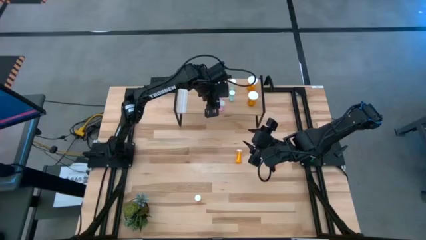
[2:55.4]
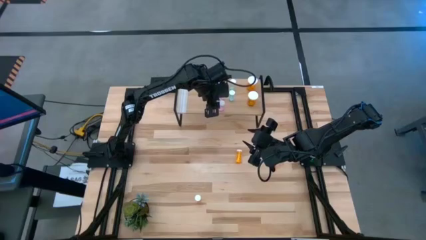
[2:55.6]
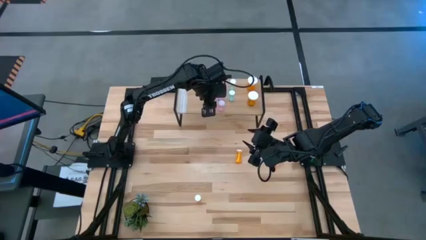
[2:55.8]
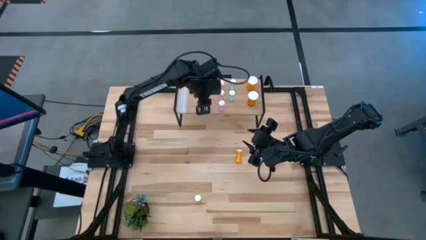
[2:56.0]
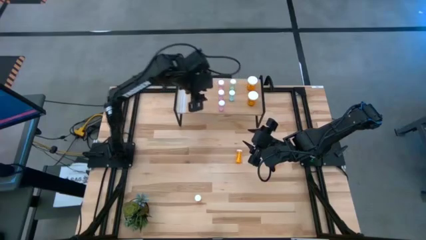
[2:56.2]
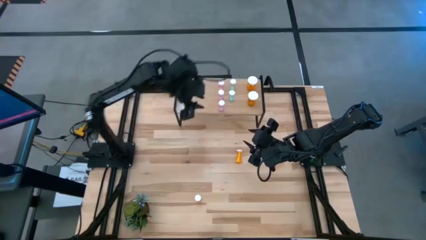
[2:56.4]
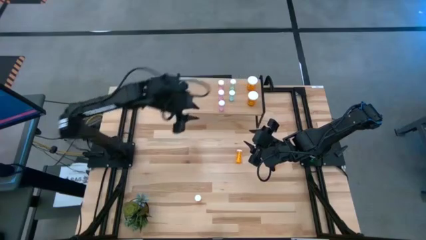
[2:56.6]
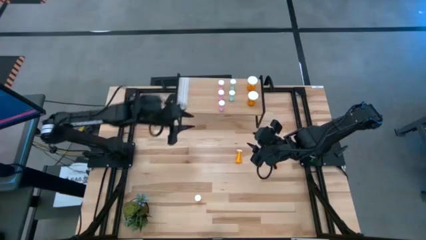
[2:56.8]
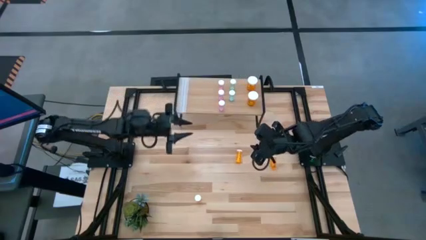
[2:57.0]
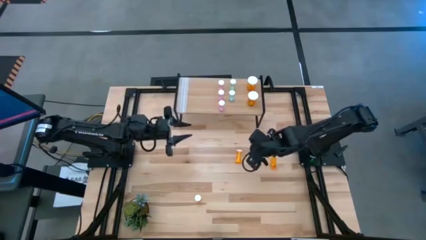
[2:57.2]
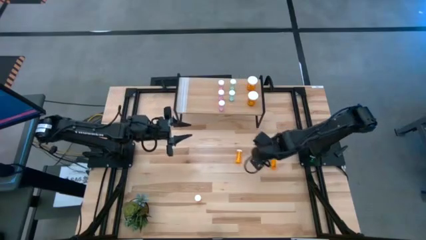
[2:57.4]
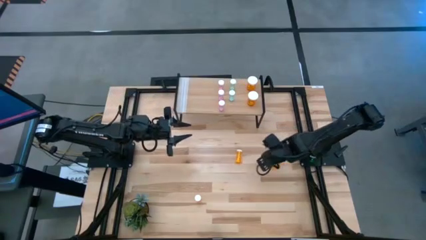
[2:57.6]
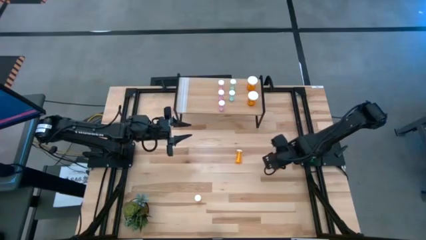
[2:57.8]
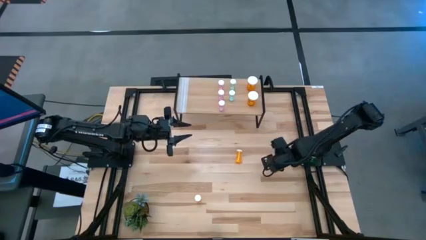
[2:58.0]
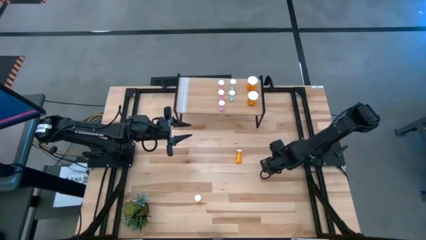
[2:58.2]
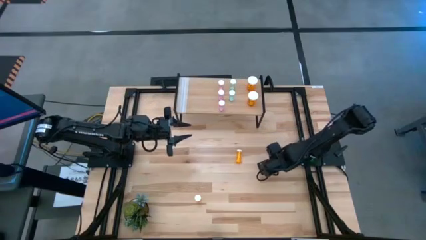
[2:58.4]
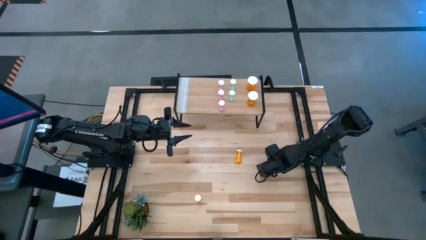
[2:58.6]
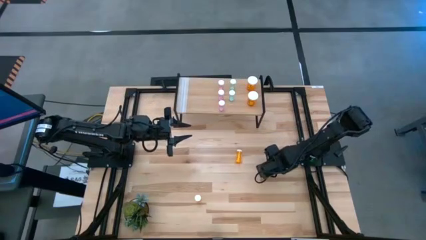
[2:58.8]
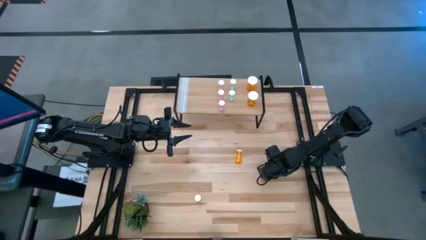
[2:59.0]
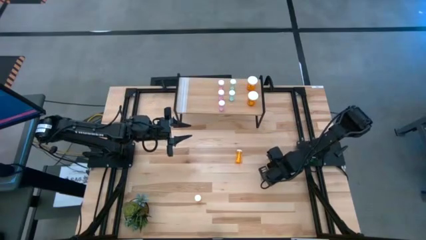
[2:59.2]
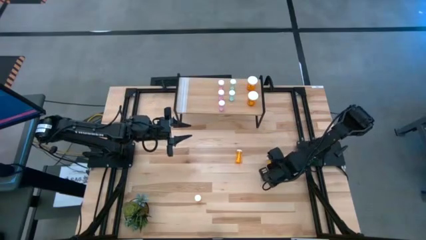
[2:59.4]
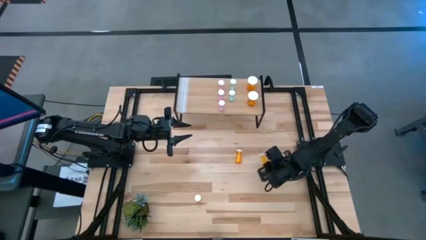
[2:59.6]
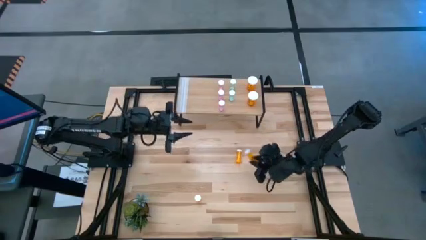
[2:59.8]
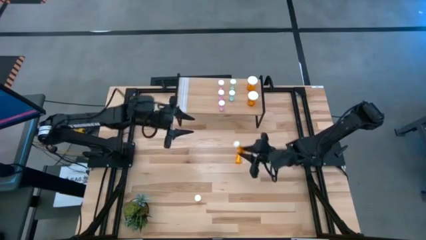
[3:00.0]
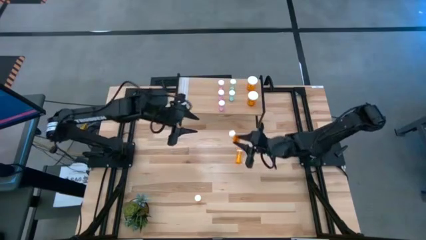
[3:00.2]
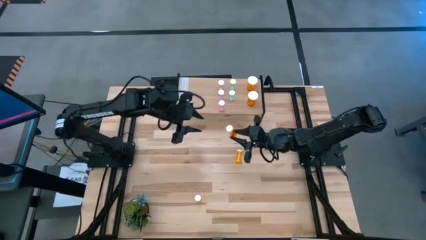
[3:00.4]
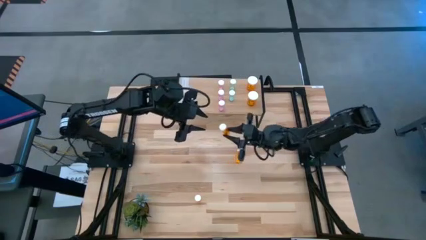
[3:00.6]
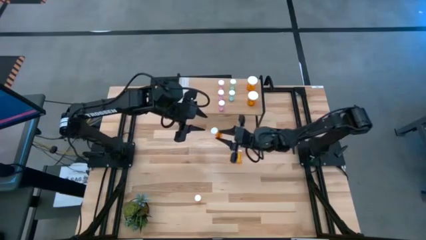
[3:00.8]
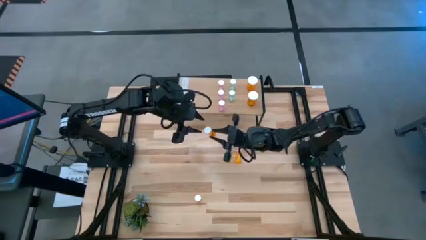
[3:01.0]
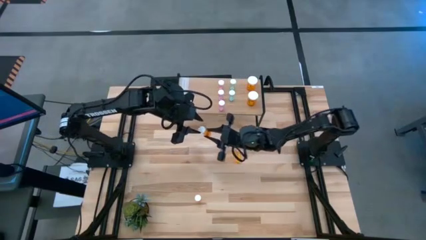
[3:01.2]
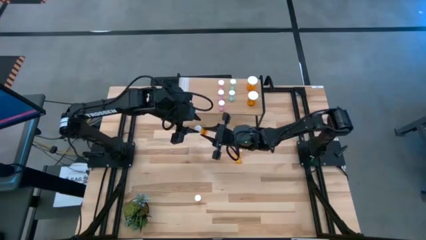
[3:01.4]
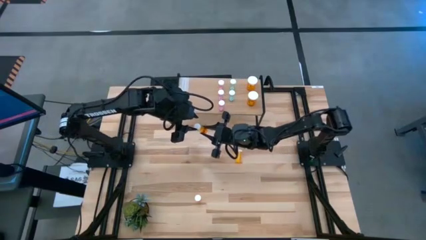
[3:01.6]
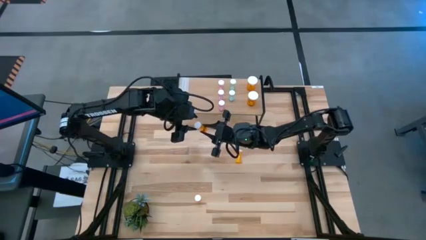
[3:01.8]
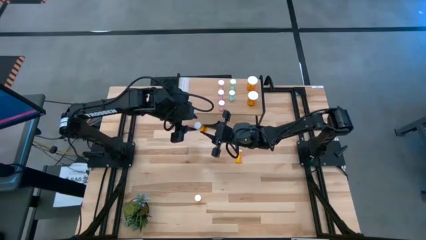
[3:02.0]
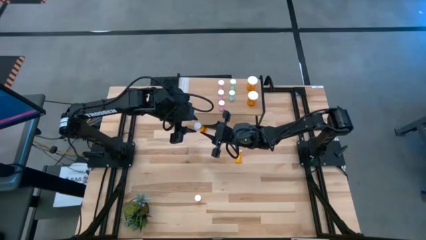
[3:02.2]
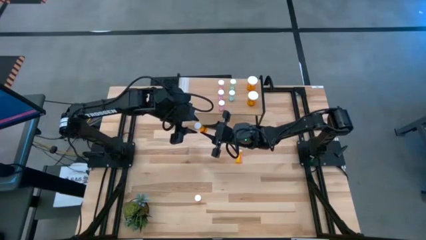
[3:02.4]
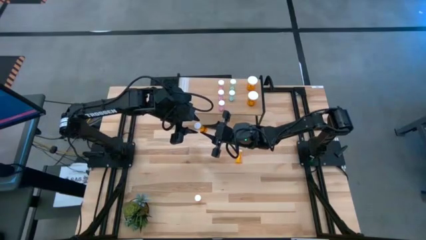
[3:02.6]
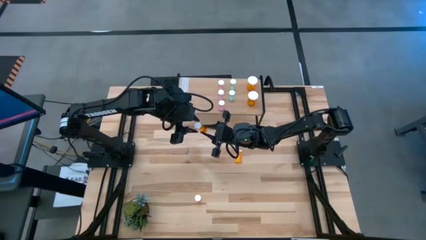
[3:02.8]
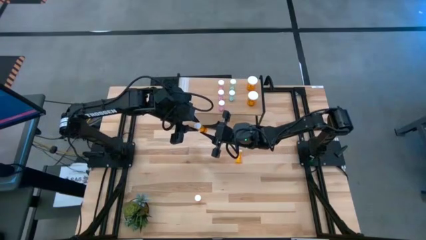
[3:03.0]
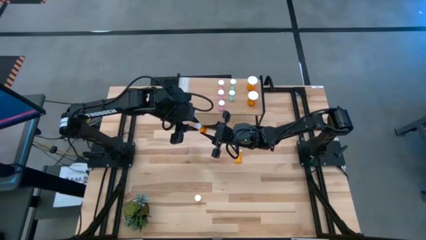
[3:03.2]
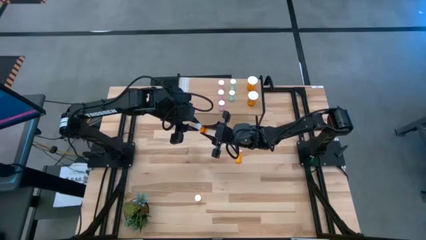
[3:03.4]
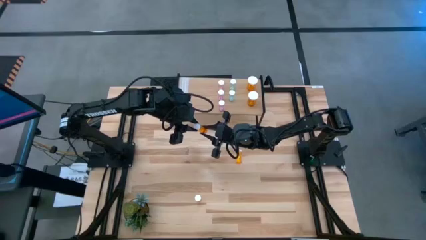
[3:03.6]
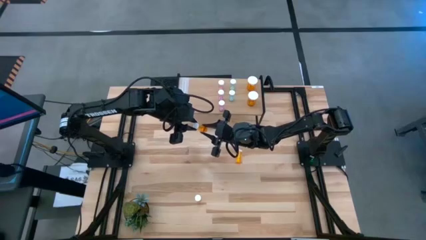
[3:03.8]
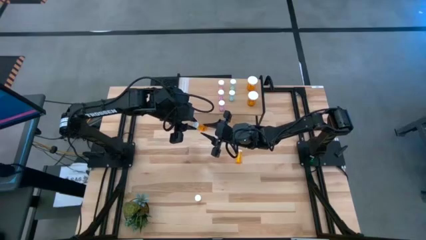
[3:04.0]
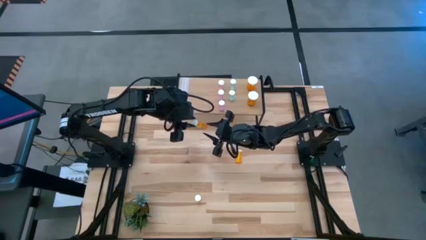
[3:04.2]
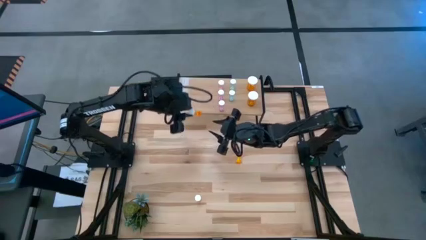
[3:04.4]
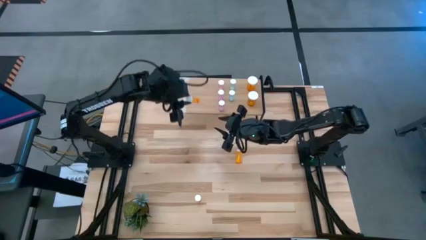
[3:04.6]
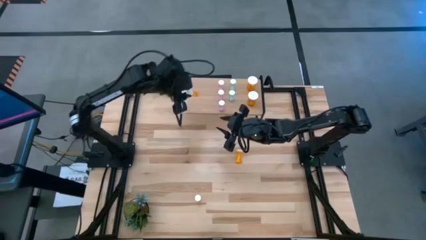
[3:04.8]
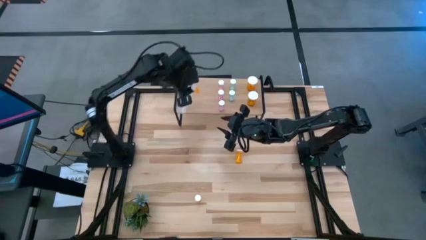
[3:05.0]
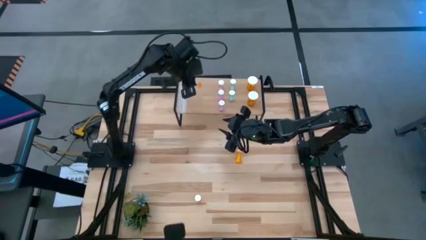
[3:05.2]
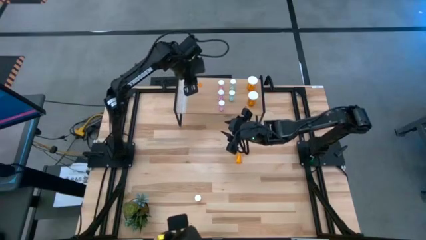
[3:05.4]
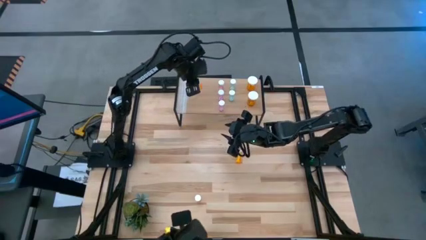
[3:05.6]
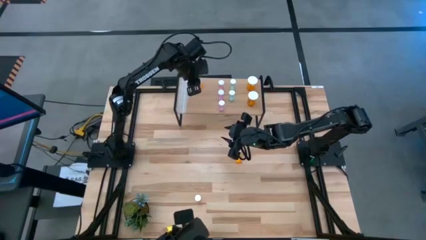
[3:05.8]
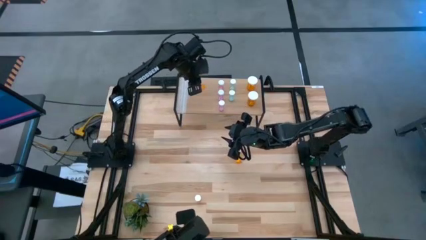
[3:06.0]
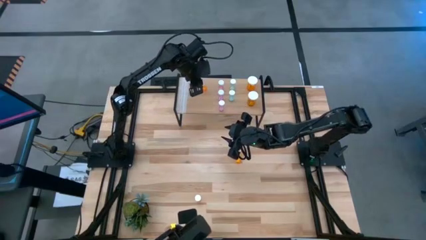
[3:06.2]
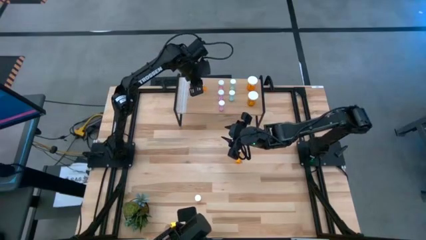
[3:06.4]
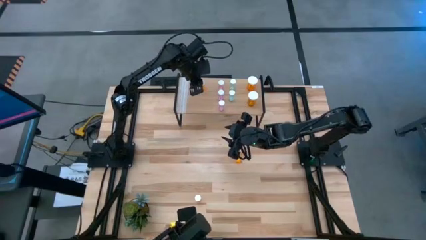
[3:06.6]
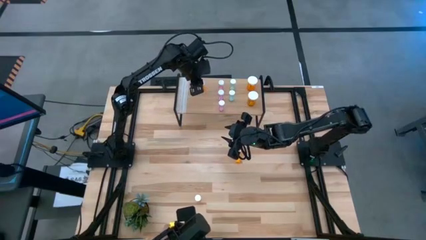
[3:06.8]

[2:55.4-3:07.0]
Task: Pick and place medicine bottles onto shelf by color
Put the middle right small orange pill bottle on the shelf
